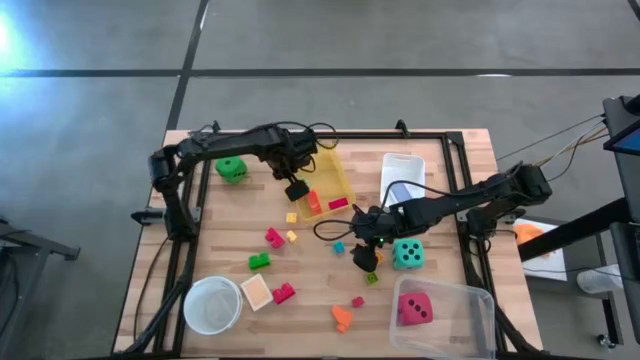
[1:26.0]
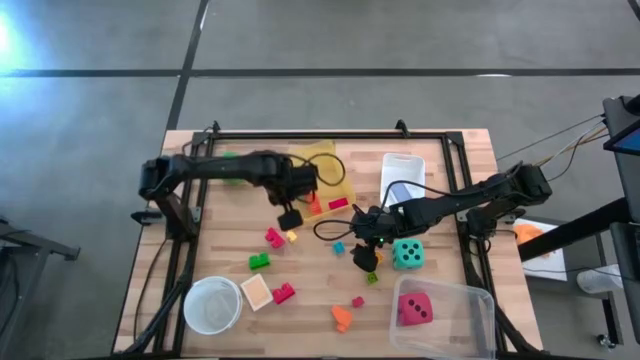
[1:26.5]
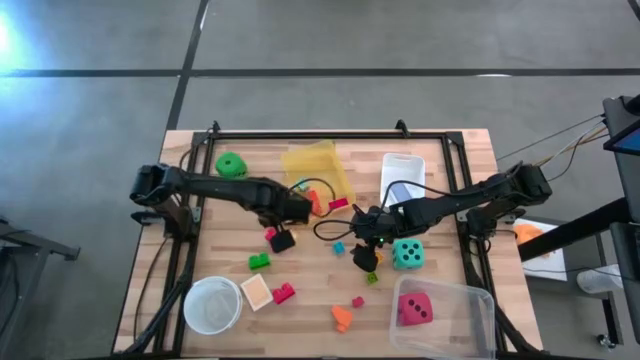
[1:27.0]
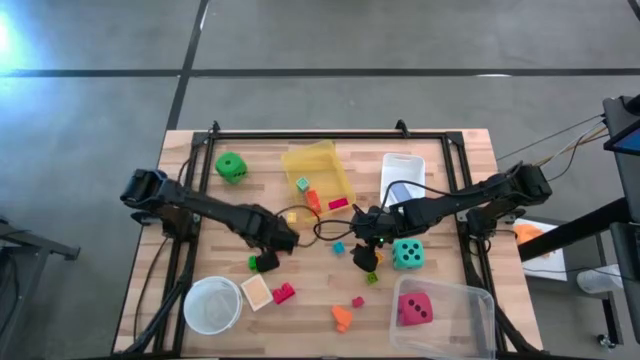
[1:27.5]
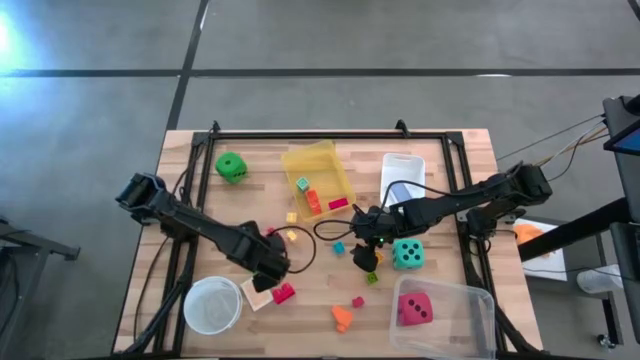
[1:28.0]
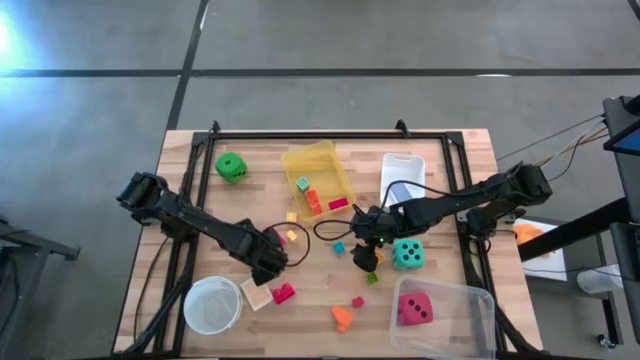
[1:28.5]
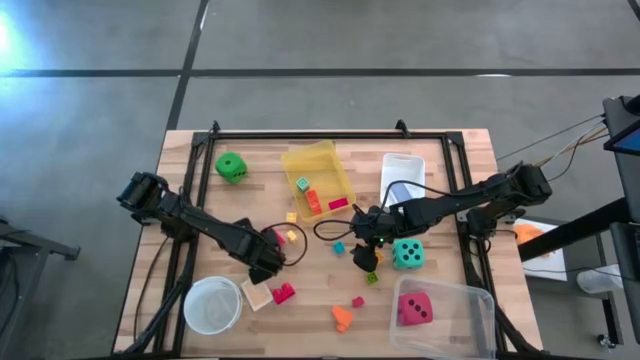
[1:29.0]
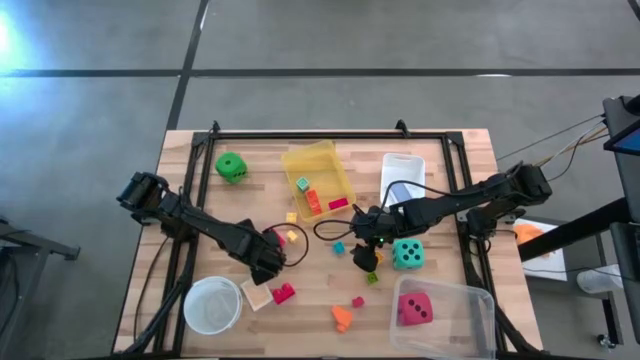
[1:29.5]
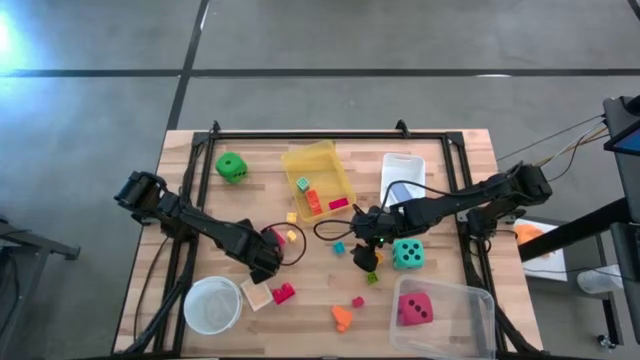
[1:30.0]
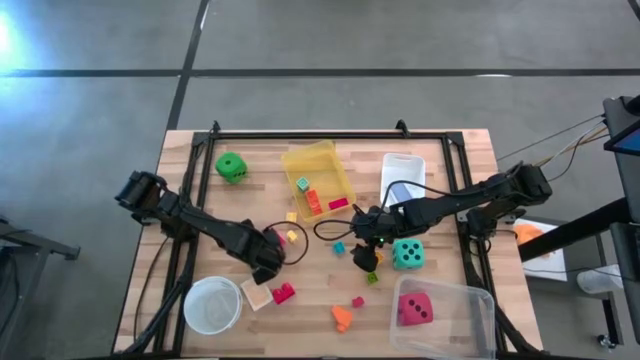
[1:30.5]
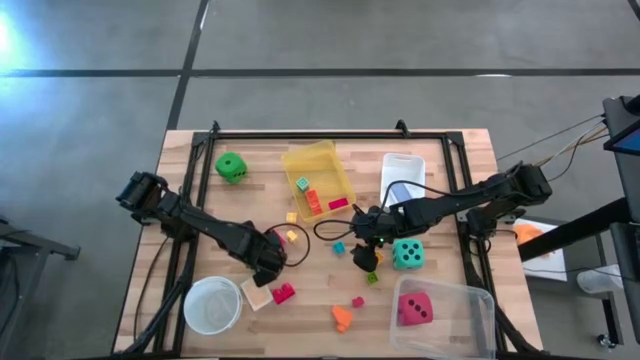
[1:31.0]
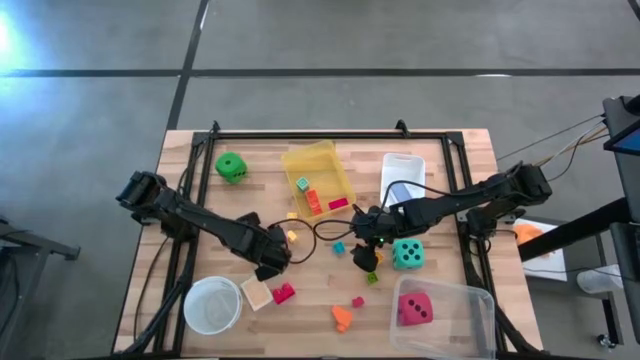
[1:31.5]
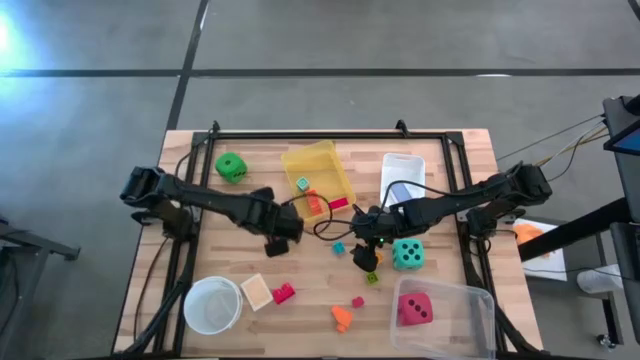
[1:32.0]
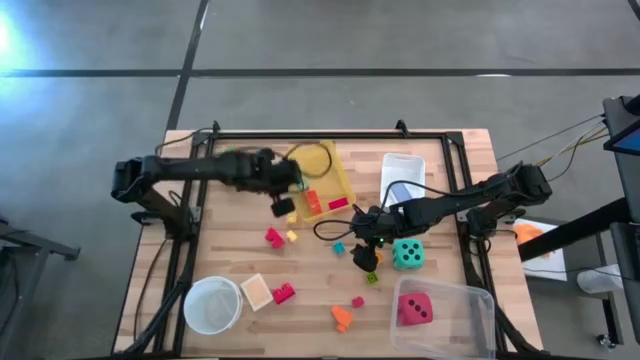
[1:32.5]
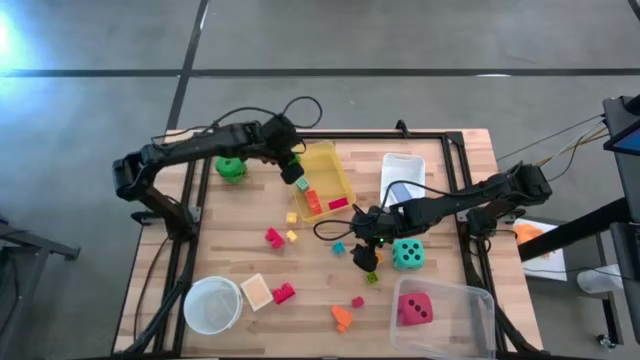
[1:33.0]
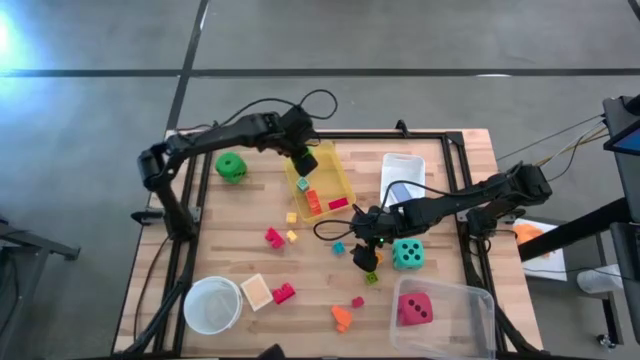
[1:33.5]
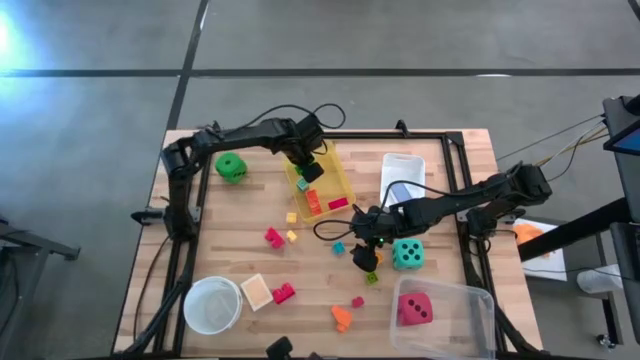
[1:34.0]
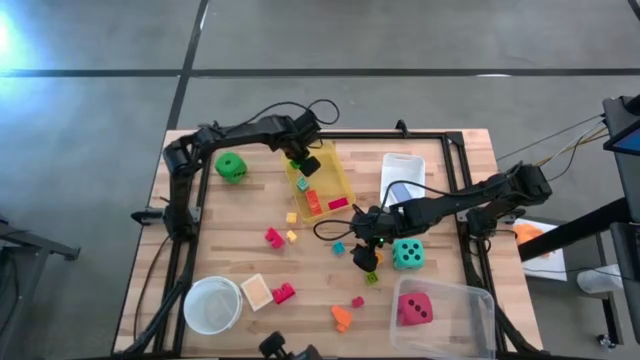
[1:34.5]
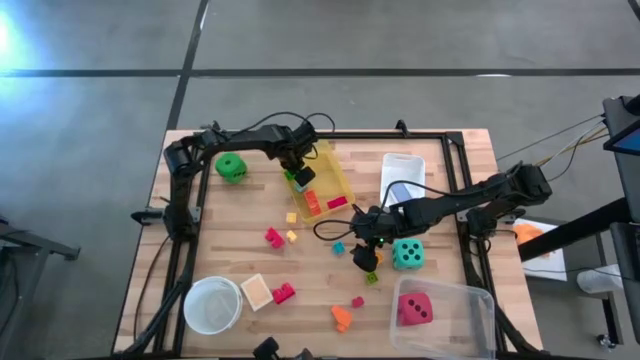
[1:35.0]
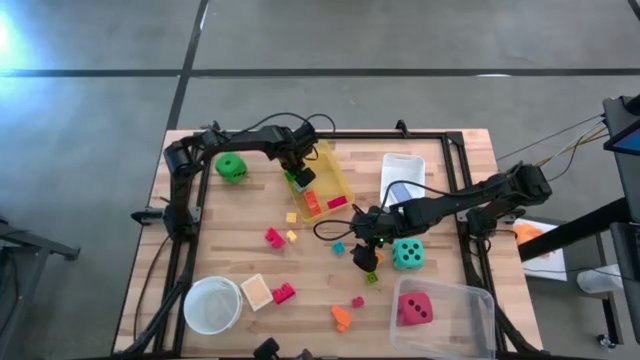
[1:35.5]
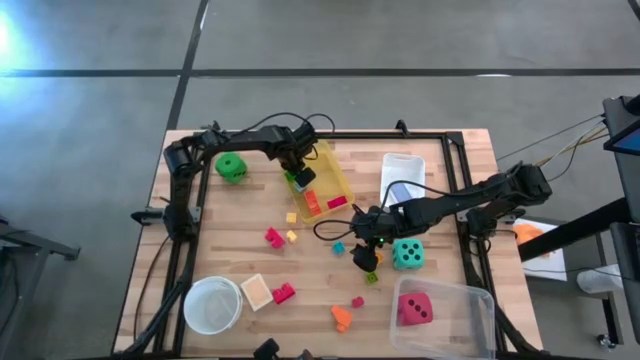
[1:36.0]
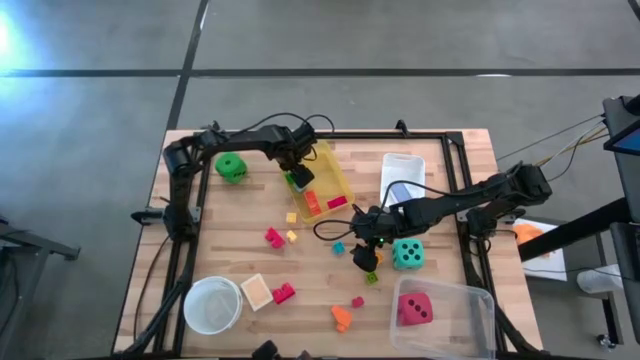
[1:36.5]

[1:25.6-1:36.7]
Task: Pick & Place Toys
Put the green game piece into the yellow bin

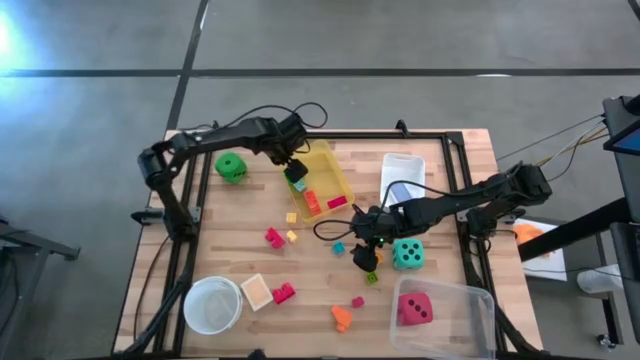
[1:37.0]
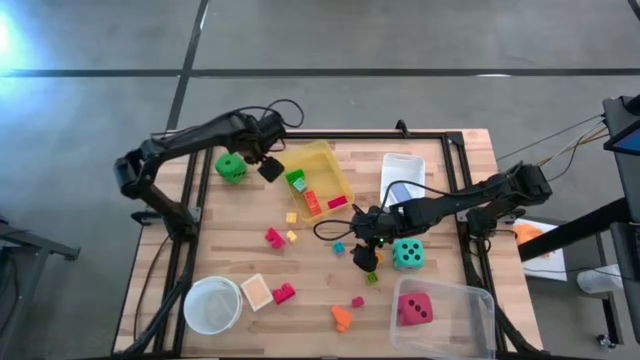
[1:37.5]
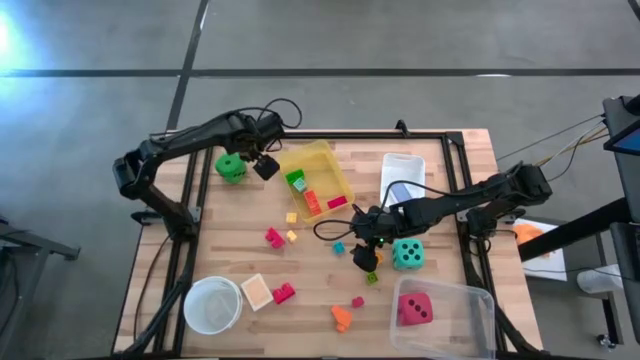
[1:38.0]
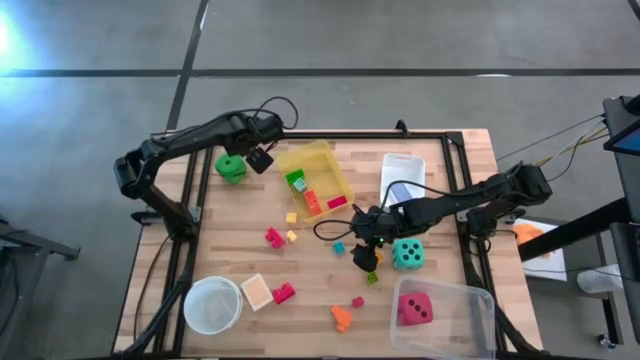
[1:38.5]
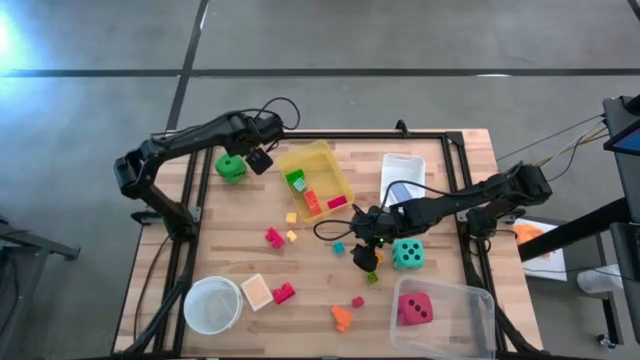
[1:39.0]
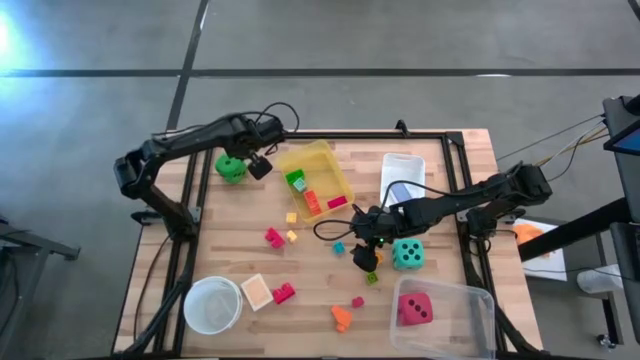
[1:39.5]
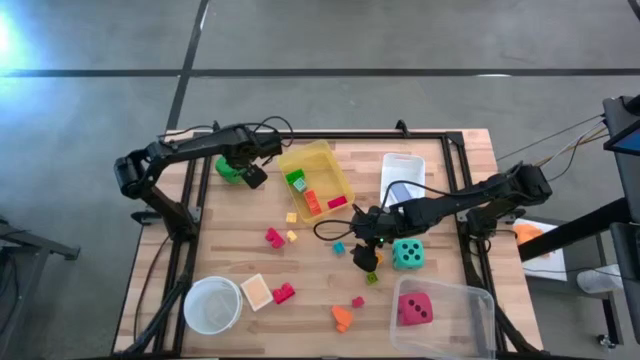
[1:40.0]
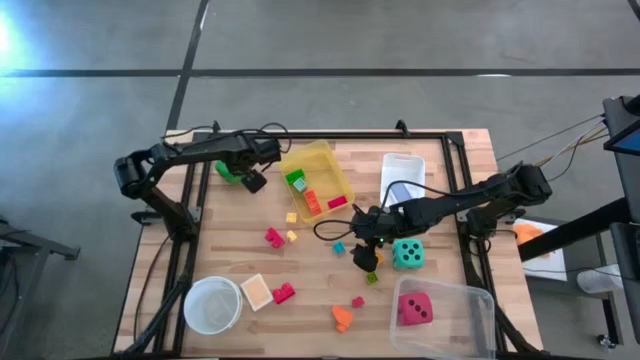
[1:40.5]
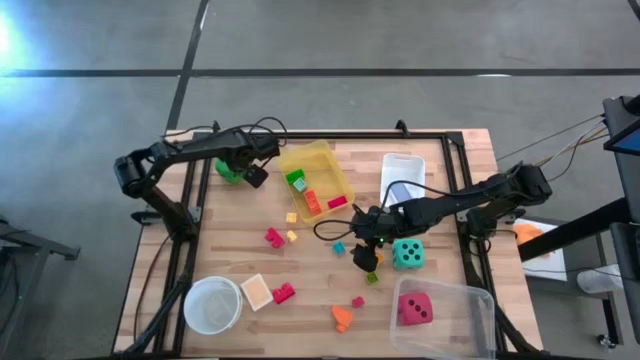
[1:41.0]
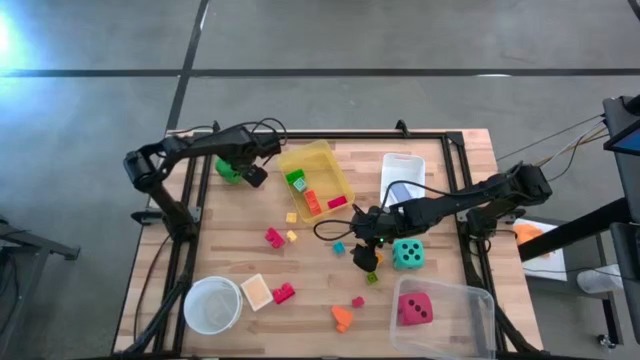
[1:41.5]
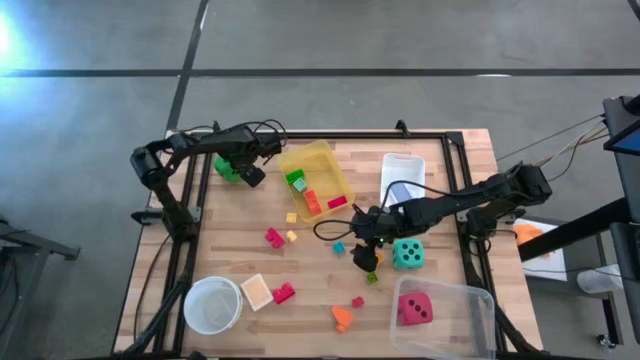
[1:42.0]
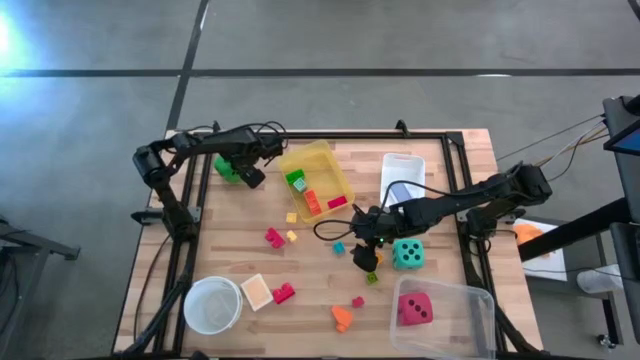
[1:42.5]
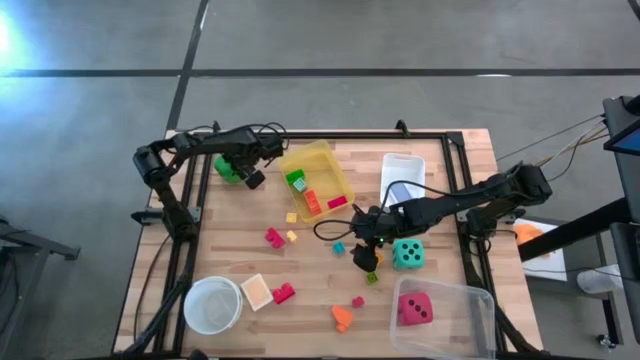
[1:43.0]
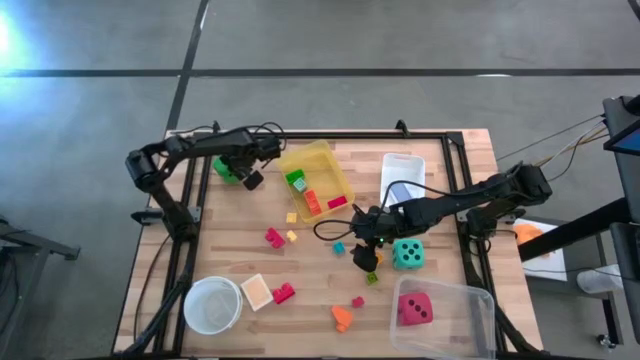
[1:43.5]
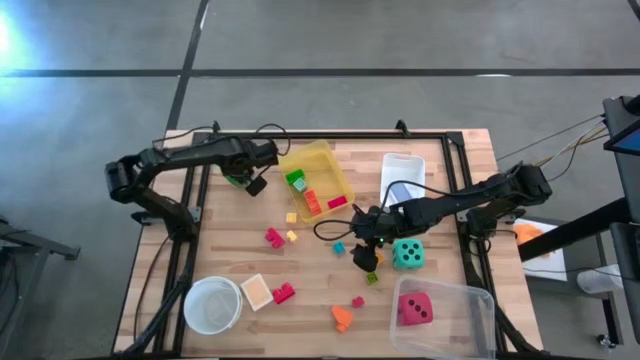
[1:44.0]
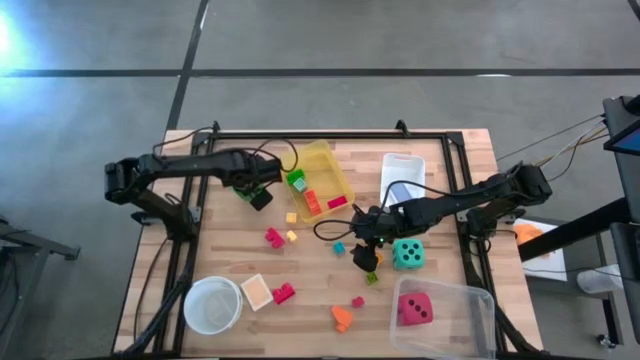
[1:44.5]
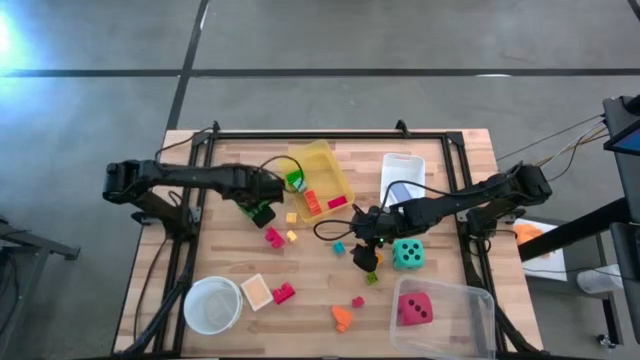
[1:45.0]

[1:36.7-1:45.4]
Put the green dice into the transparent bin

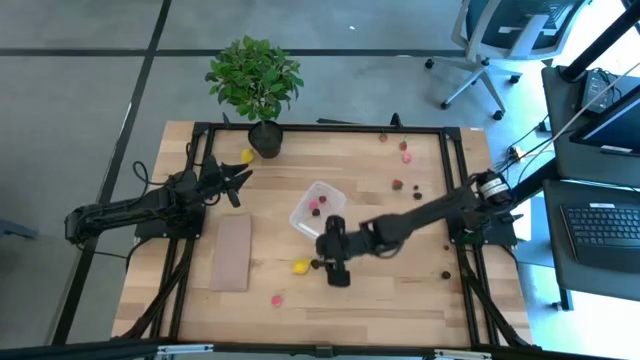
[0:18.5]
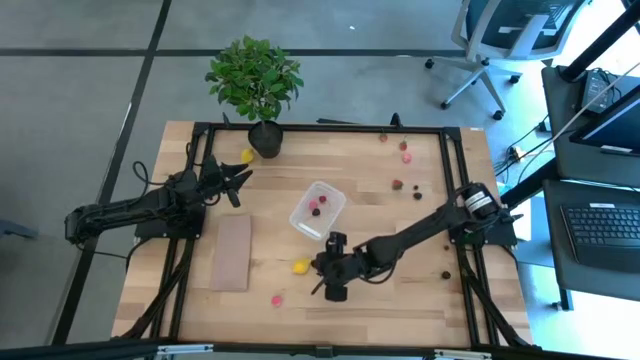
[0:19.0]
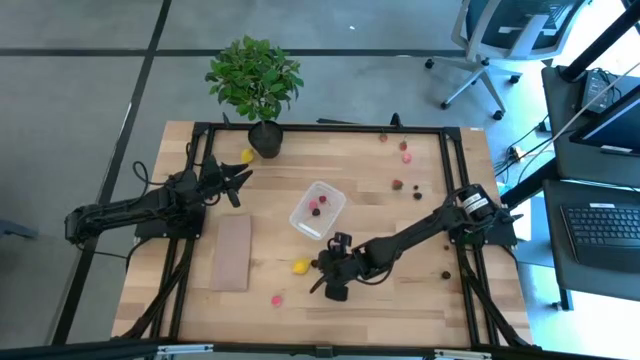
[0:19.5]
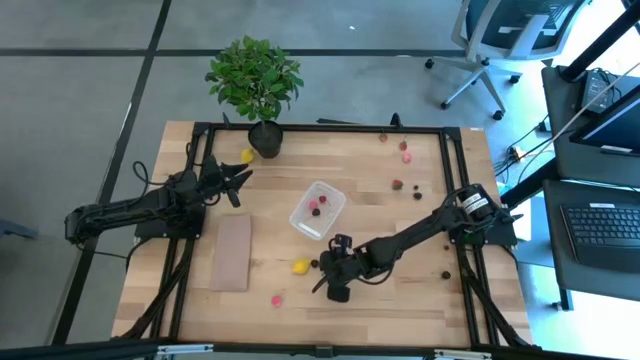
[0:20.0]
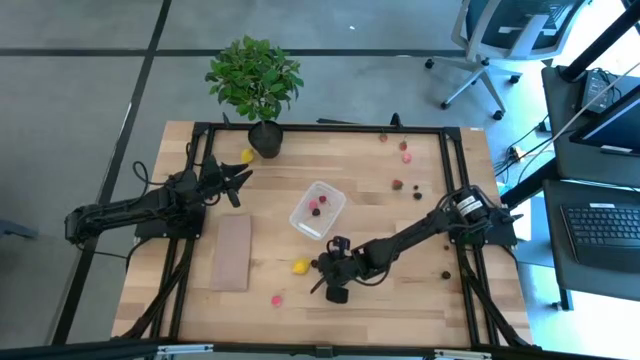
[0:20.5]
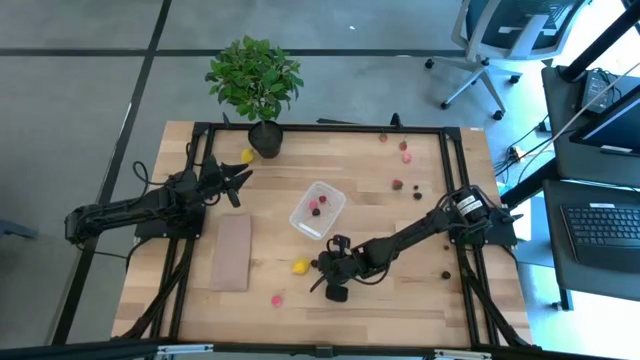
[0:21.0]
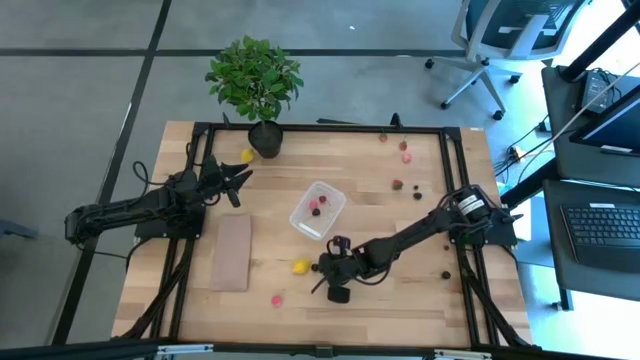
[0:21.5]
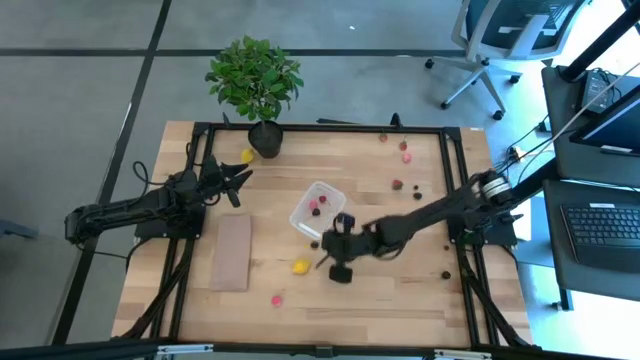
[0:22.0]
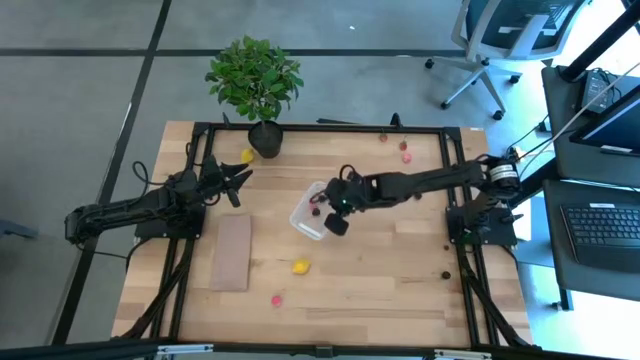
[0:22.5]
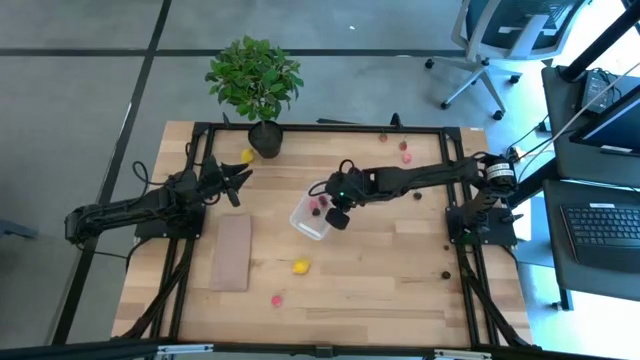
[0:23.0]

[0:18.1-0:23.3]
Task: Pick and placing Produce into tupperware
Put the left black cherry into the transparent bin
